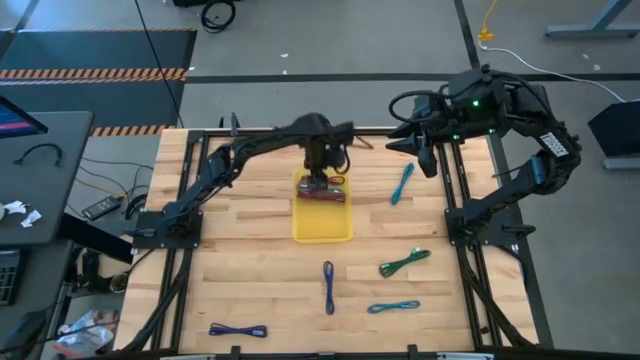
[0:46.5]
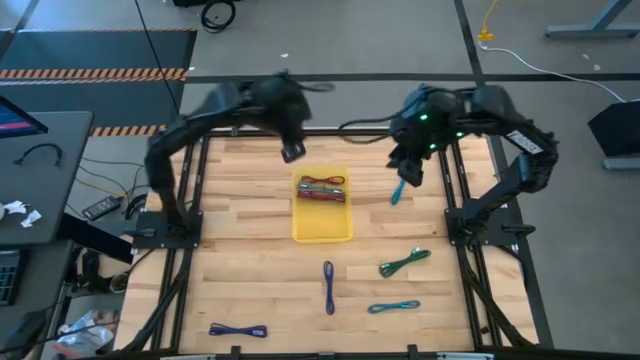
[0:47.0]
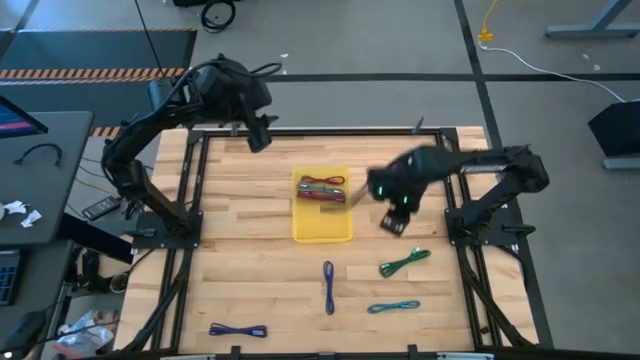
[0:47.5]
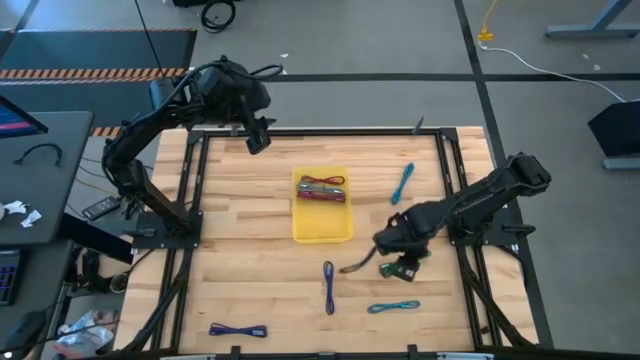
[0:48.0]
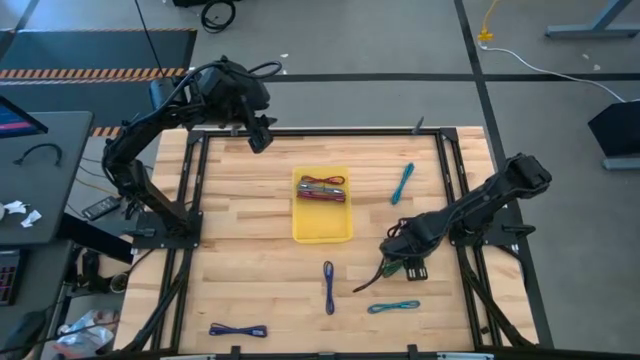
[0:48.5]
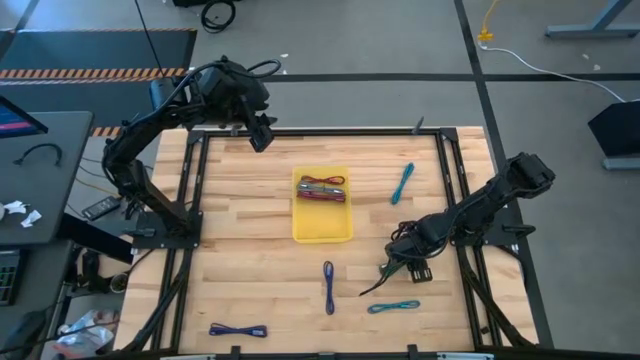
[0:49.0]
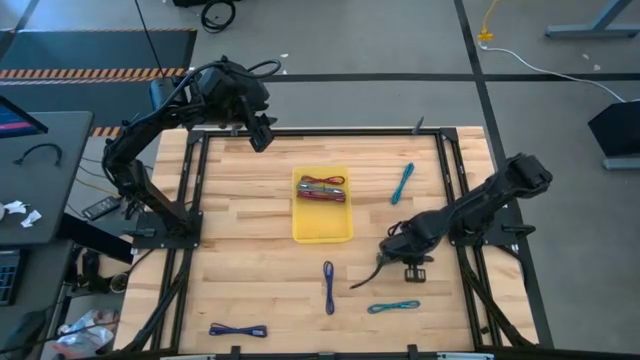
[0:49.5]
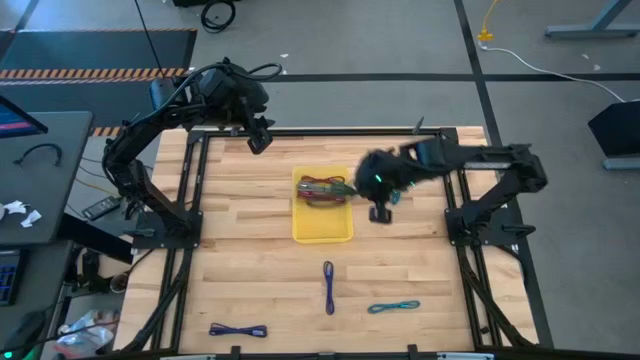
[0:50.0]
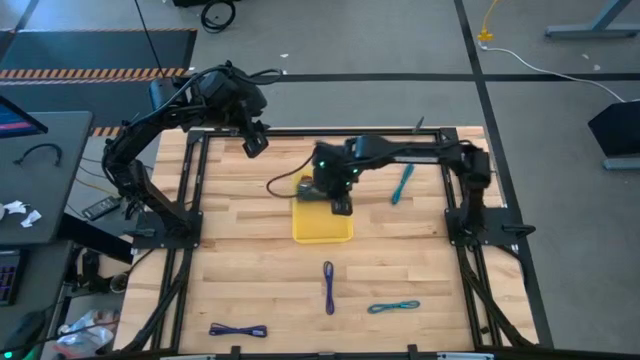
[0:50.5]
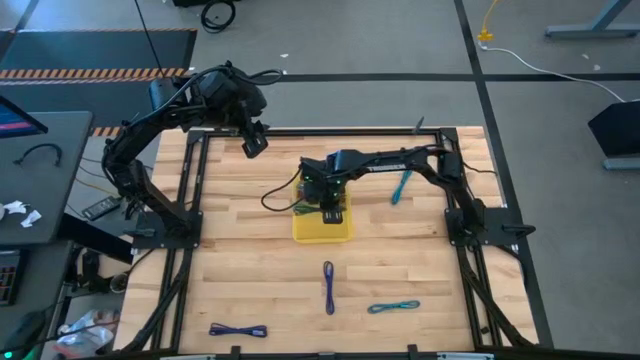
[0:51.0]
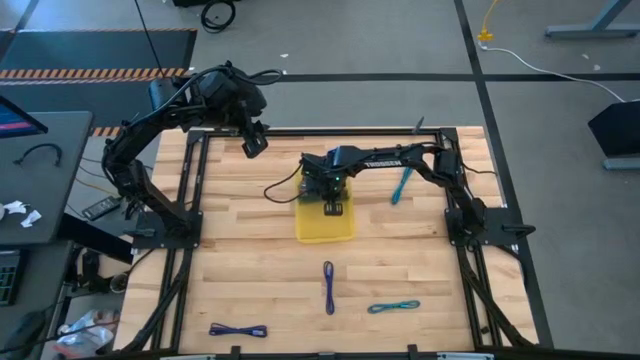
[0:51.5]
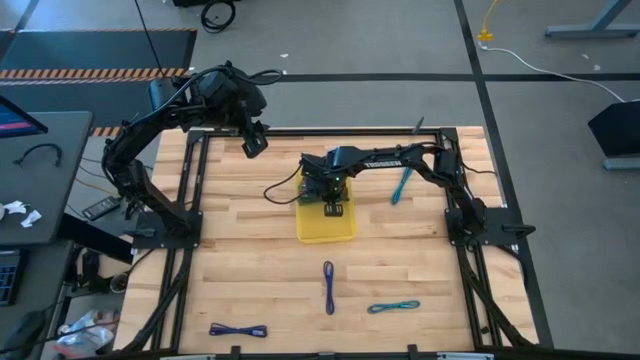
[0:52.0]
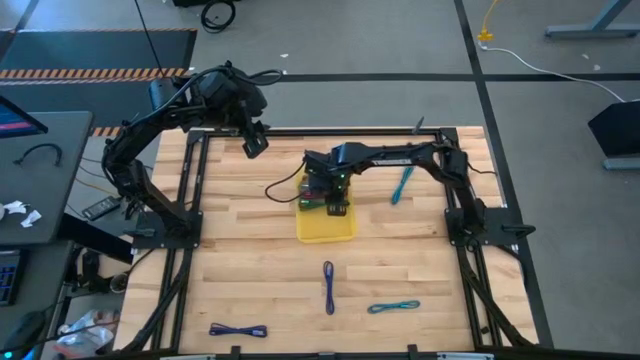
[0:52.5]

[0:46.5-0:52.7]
Task: Pick and place USB-C Cables
Put the green charger cable into the yellow bin

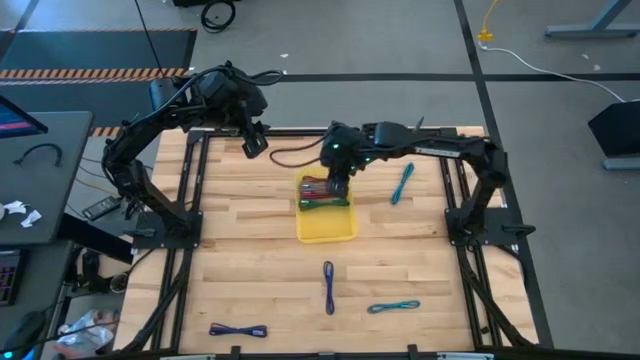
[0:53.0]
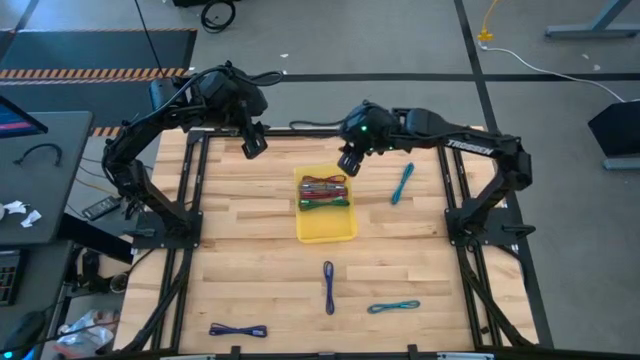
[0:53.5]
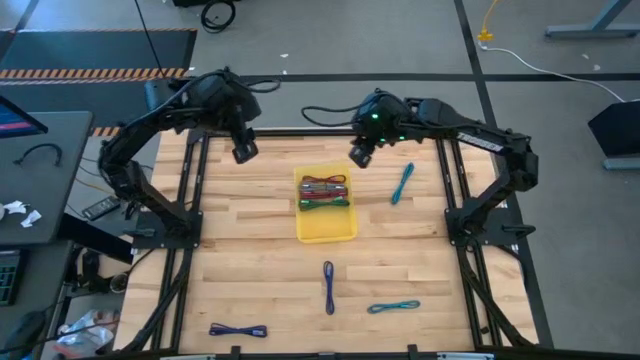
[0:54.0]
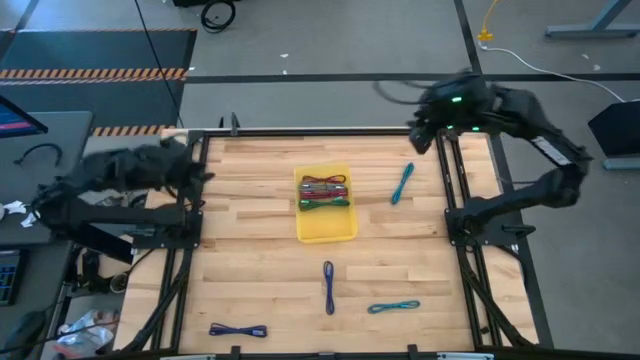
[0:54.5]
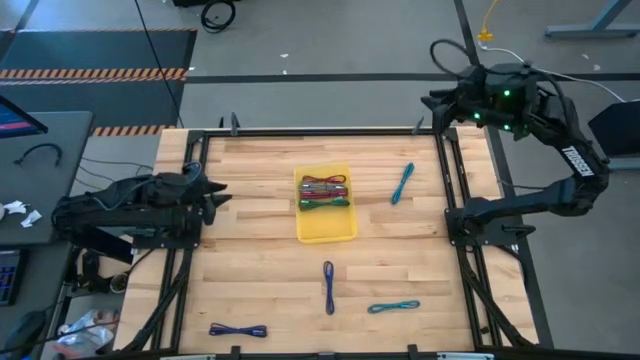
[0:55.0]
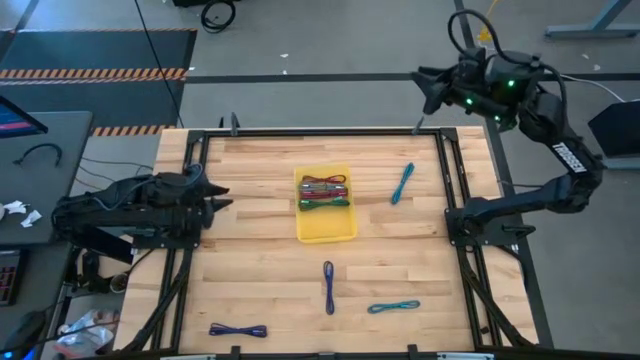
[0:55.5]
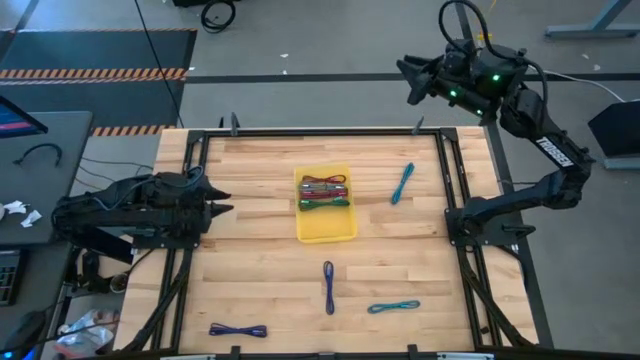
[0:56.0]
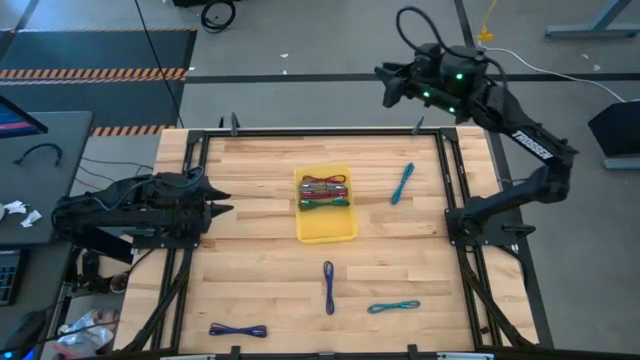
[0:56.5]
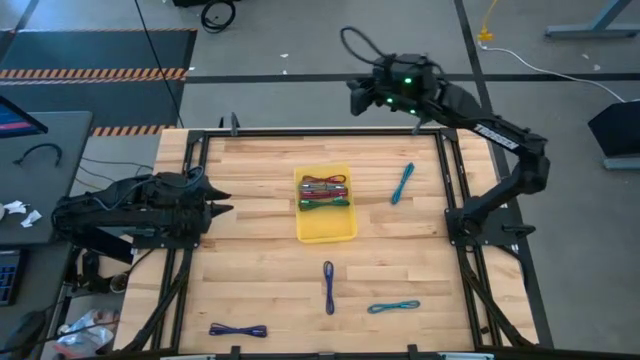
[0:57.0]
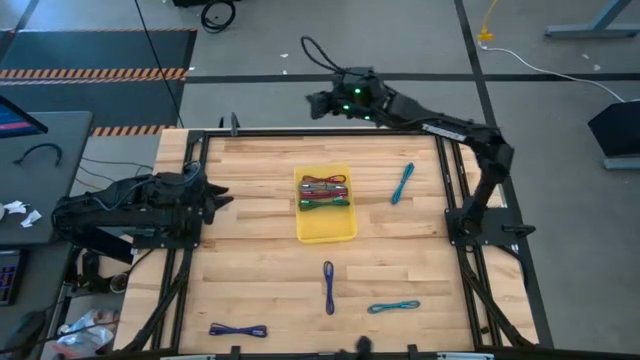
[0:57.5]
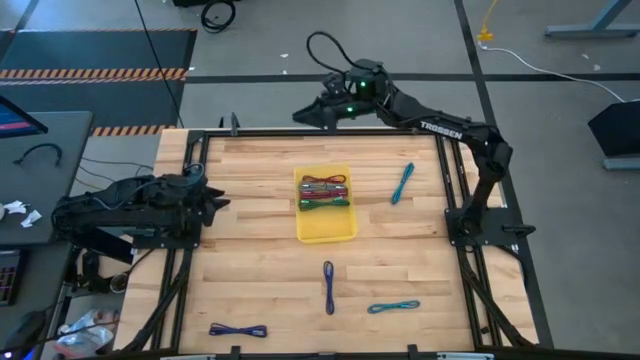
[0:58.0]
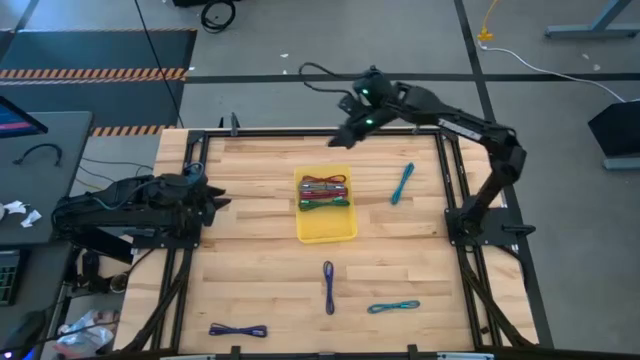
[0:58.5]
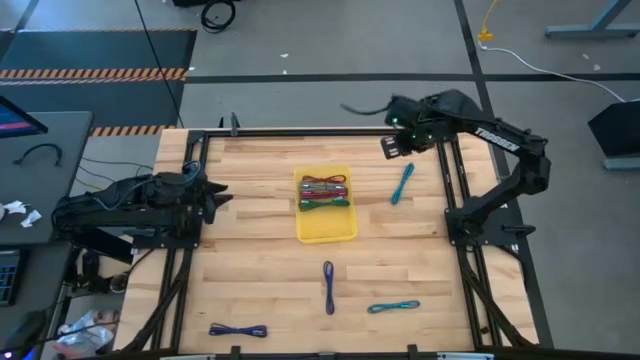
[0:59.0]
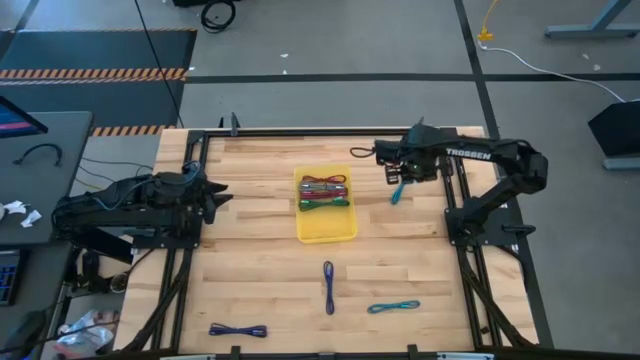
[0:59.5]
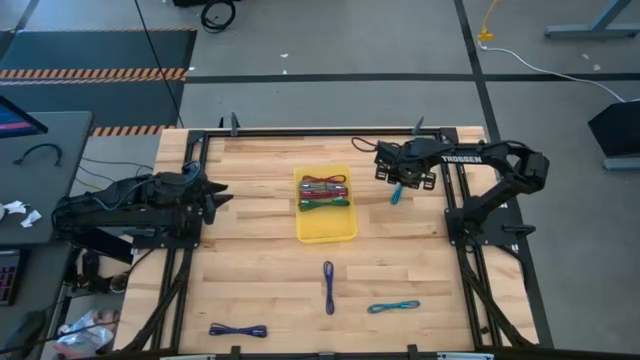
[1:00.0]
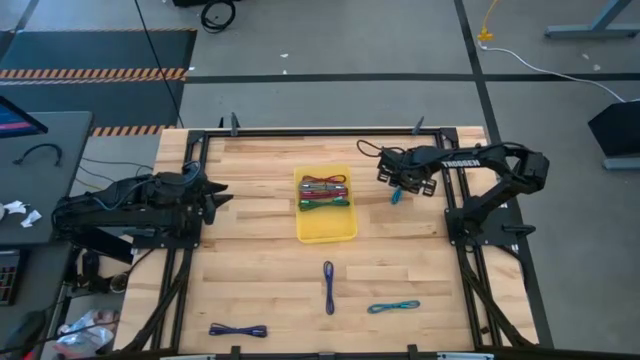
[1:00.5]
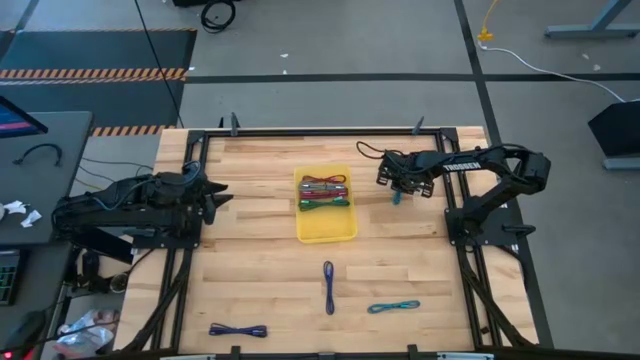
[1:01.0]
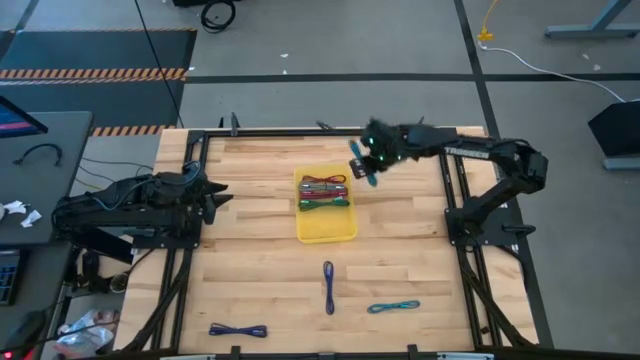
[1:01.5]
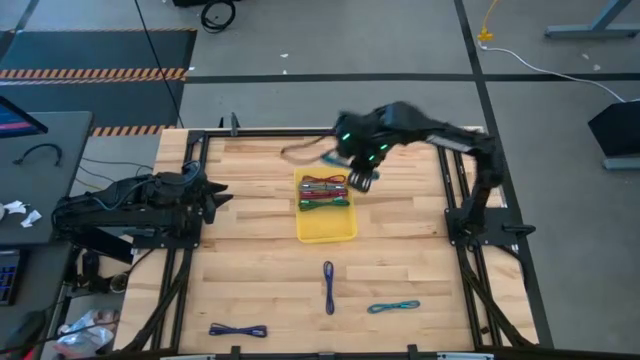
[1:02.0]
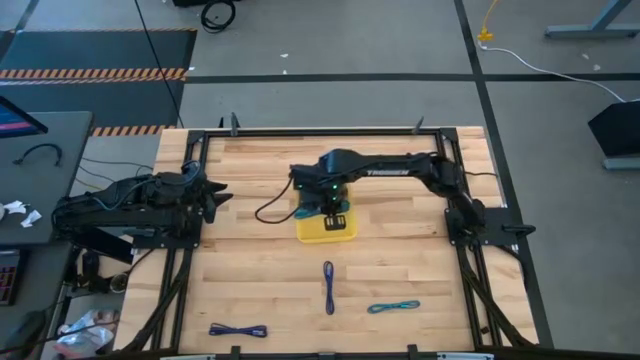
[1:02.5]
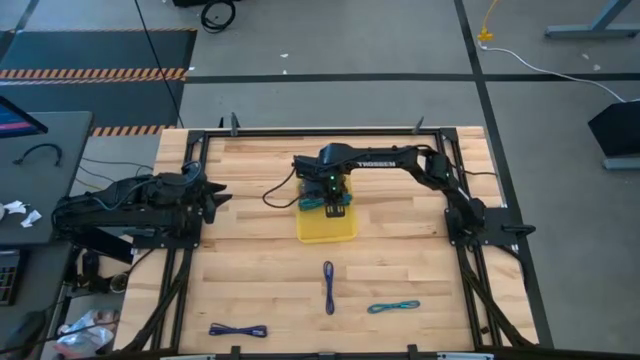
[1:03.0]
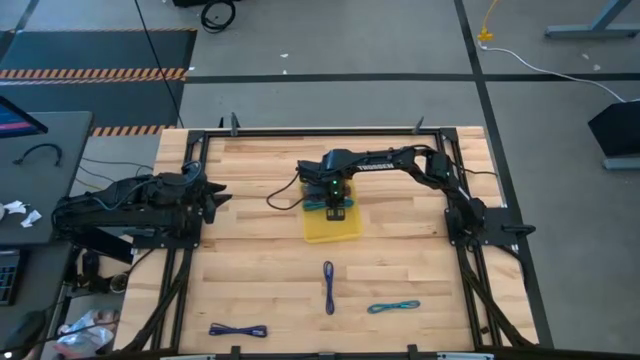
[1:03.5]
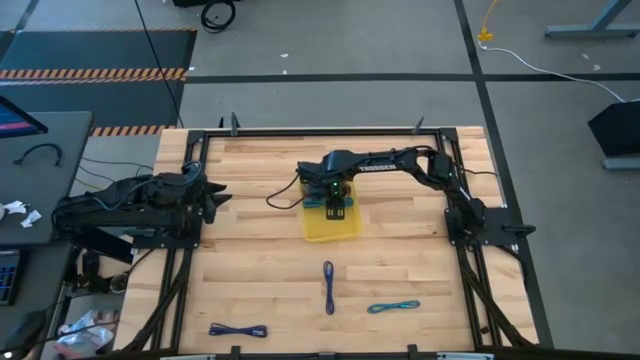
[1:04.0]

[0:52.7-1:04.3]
Put the top light blue charger cable into the yellow bin

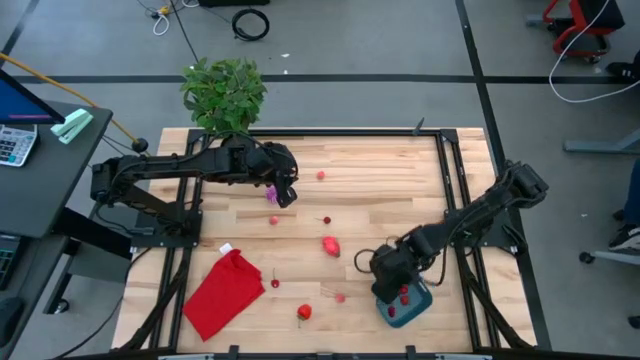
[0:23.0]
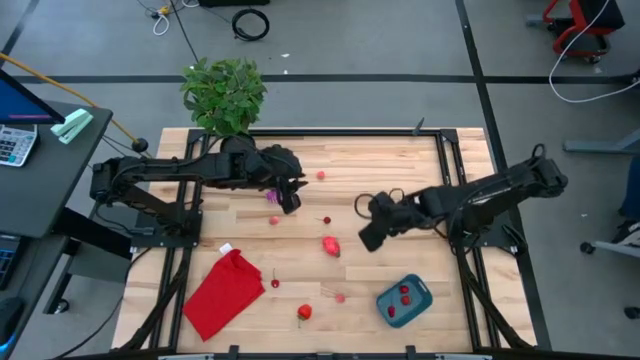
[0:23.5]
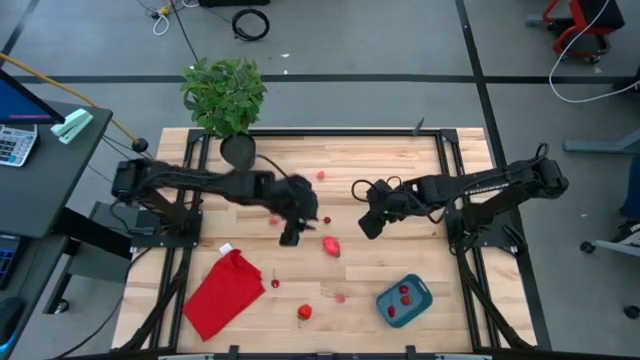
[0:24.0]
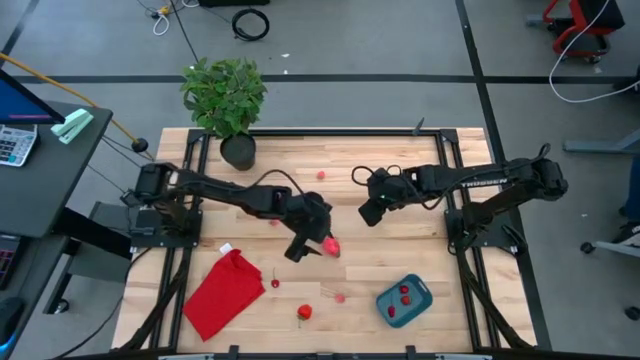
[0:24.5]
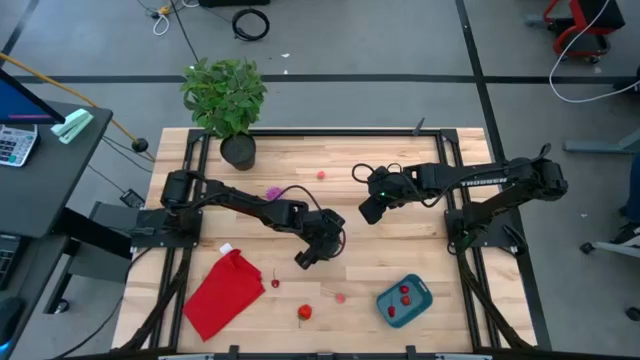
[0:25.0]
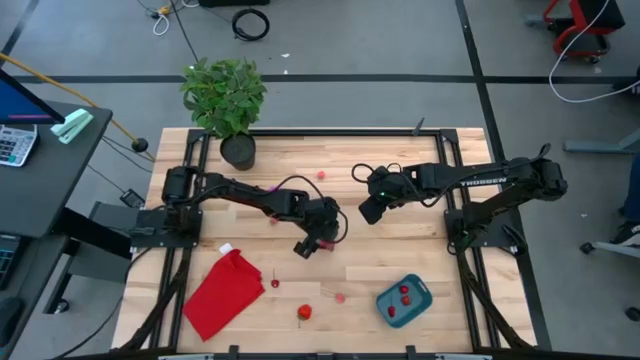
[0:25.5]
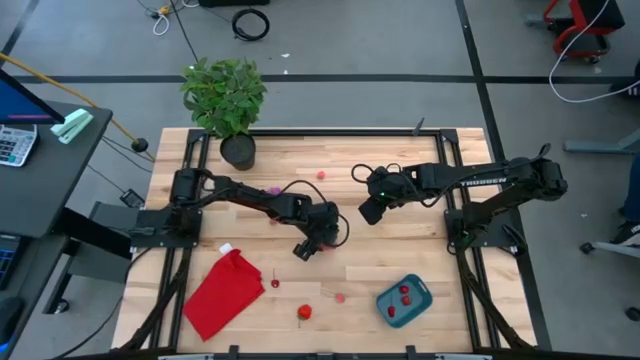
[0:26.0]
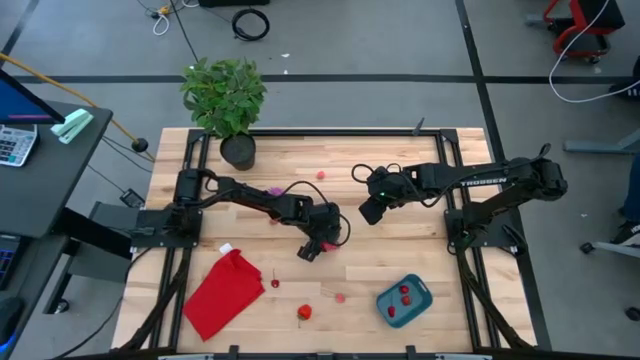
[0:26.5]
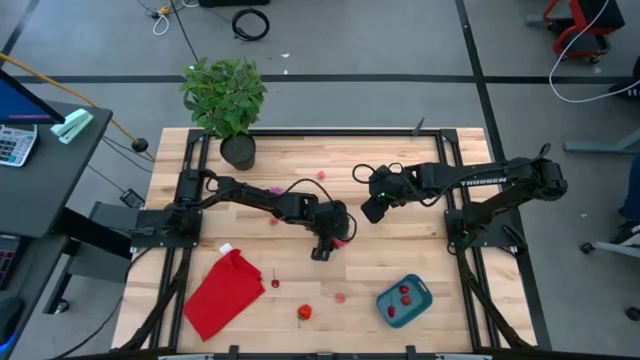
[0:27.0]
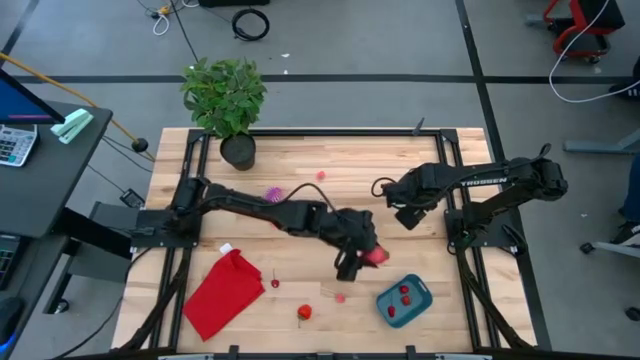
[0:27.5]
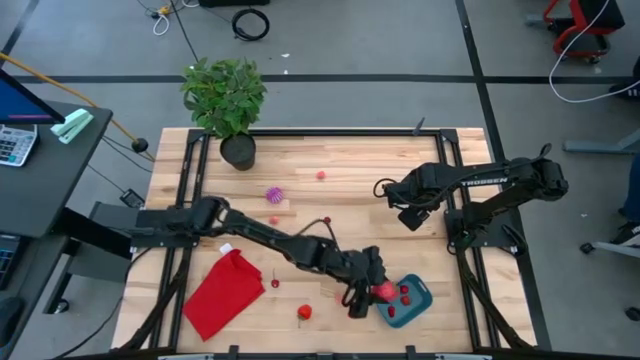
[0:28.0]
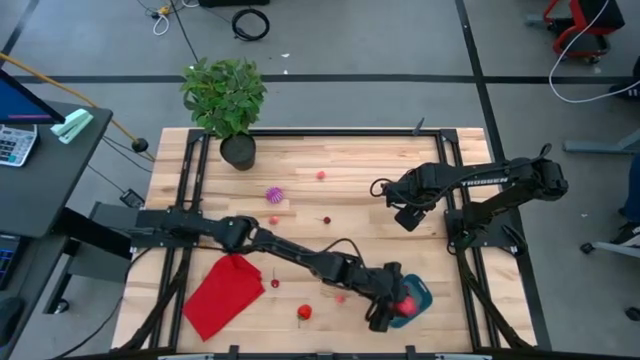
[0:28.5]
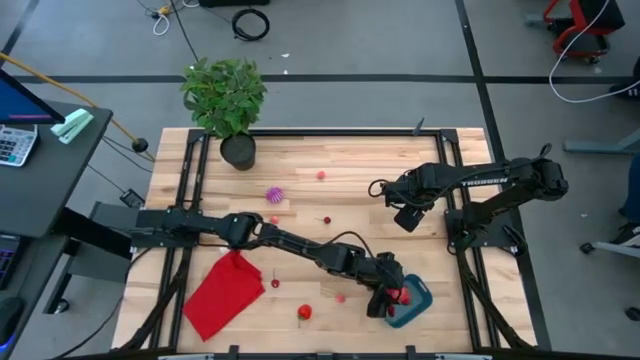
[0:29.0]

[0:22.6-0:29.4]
Task: Pick and placing Produce into tupperware
Put the dragon fruit into the bin
